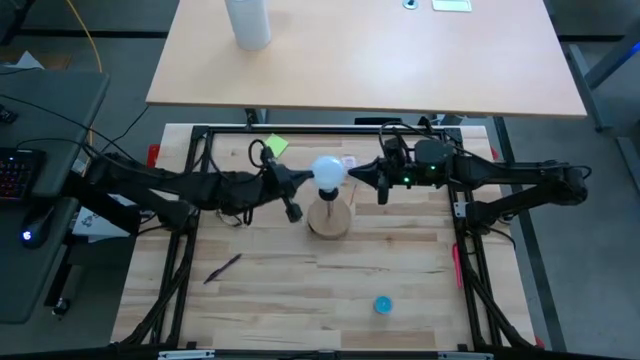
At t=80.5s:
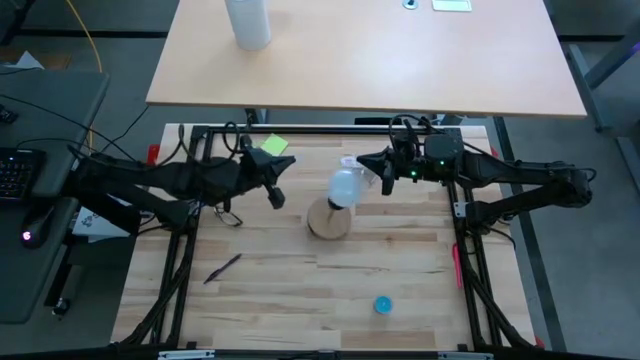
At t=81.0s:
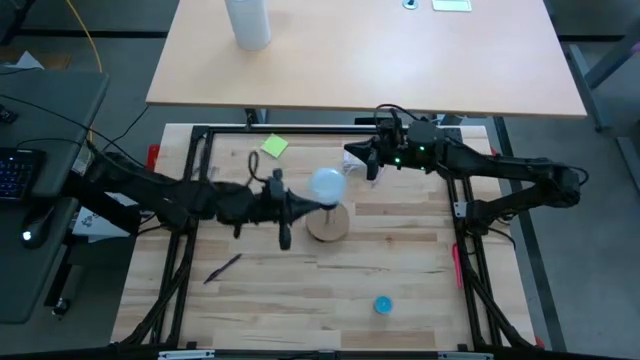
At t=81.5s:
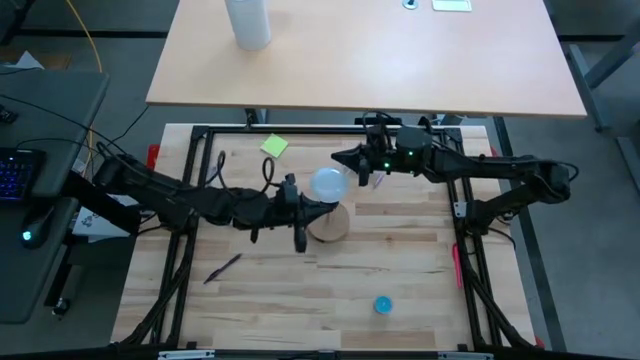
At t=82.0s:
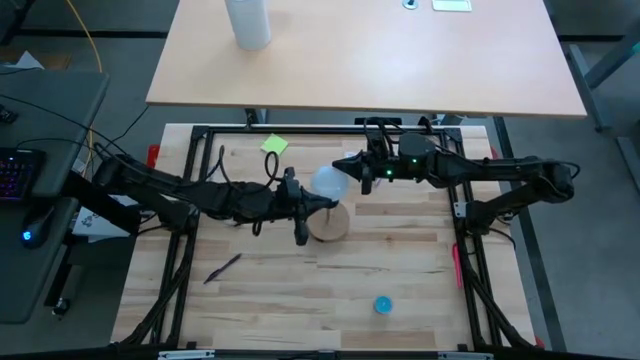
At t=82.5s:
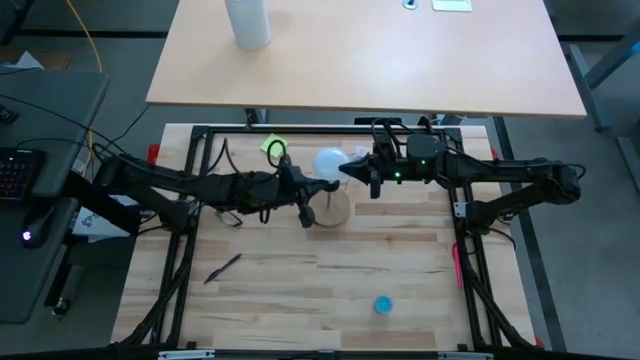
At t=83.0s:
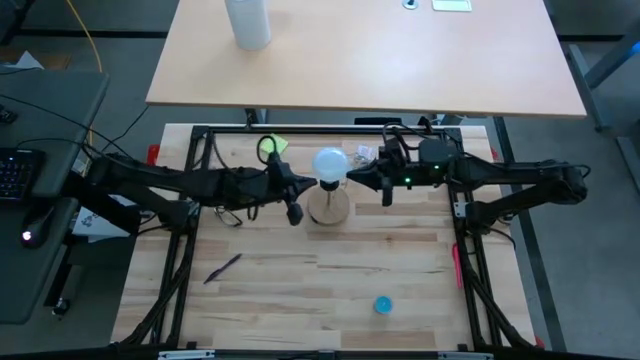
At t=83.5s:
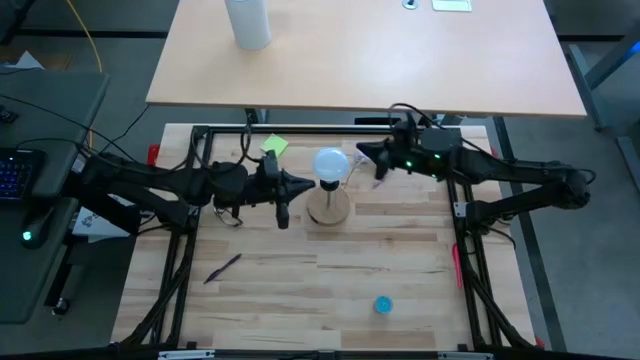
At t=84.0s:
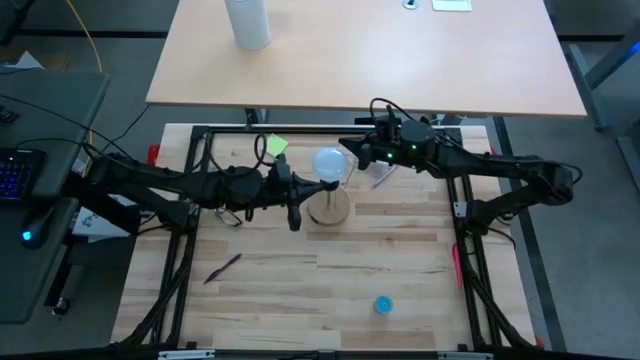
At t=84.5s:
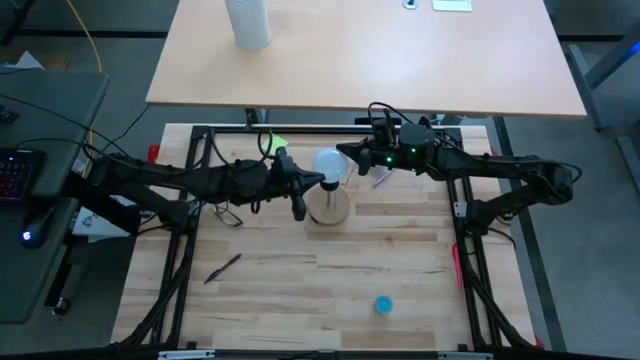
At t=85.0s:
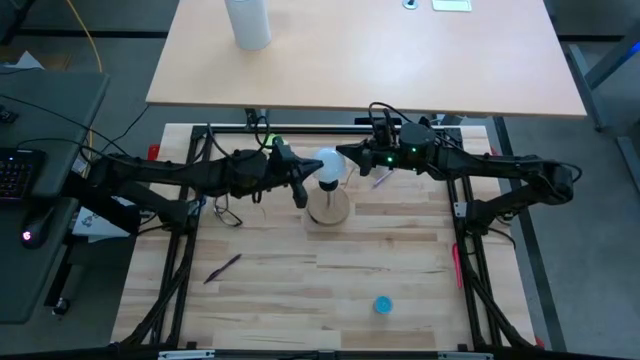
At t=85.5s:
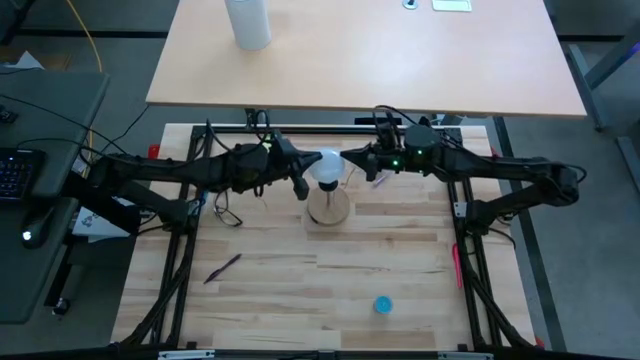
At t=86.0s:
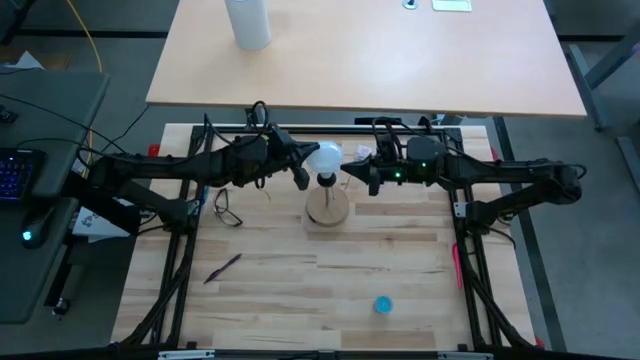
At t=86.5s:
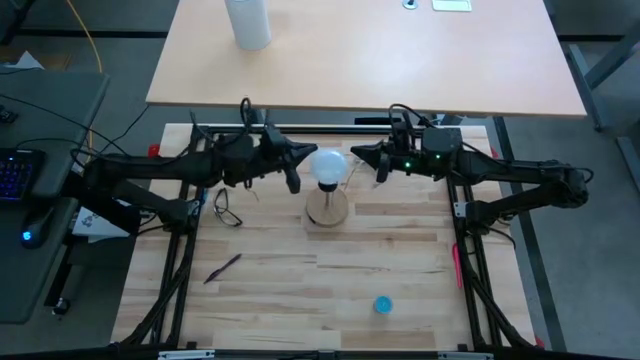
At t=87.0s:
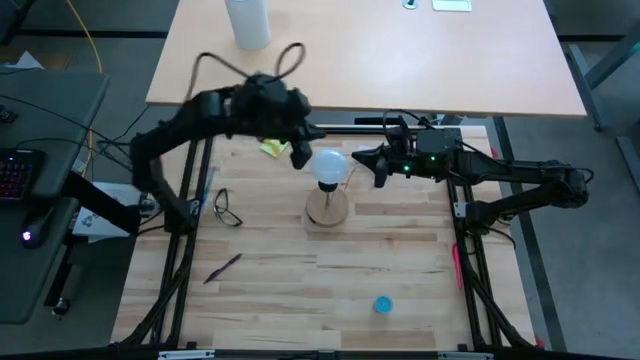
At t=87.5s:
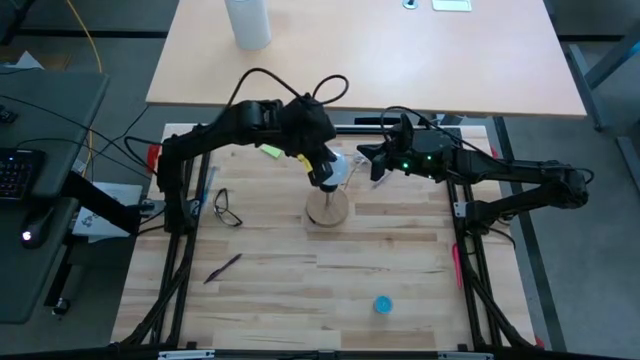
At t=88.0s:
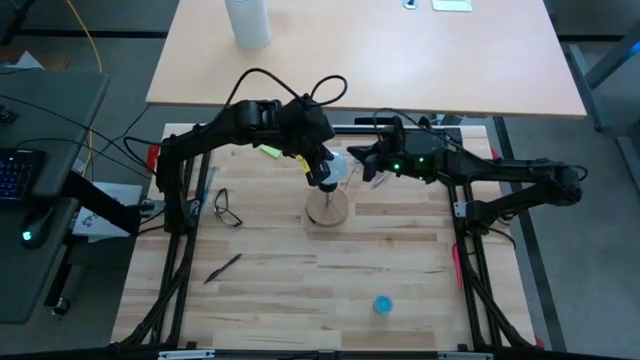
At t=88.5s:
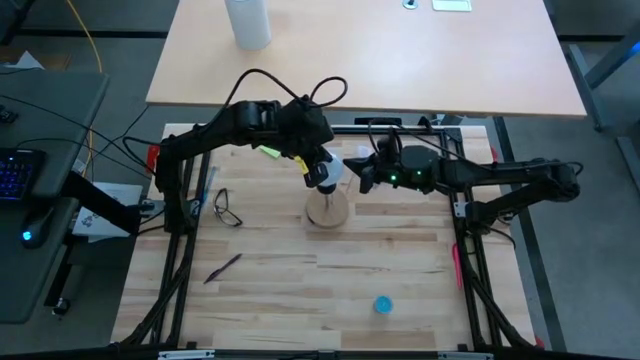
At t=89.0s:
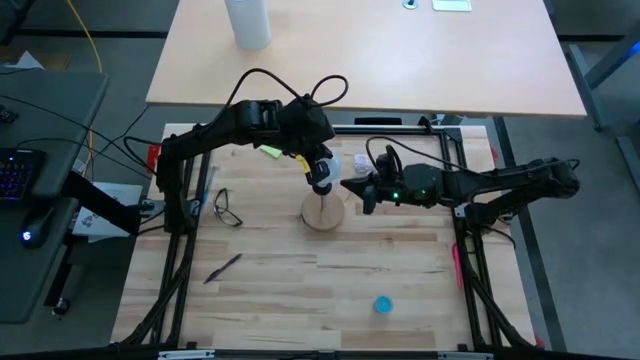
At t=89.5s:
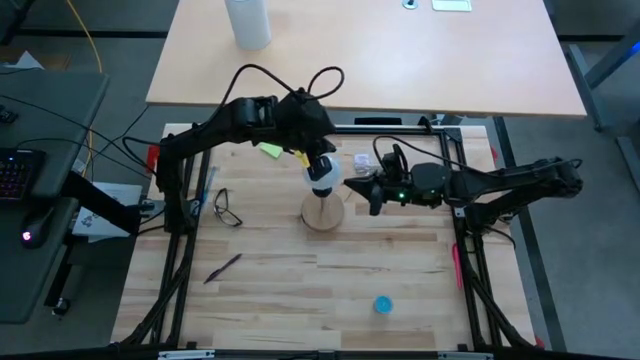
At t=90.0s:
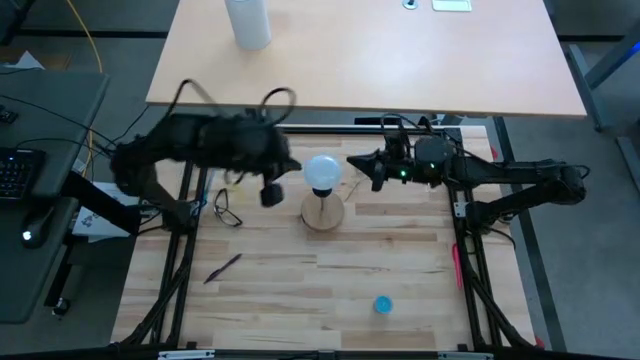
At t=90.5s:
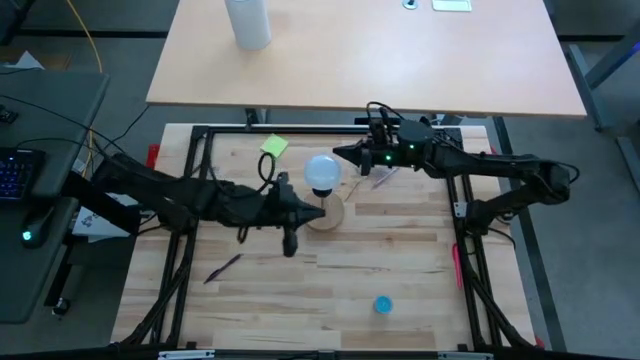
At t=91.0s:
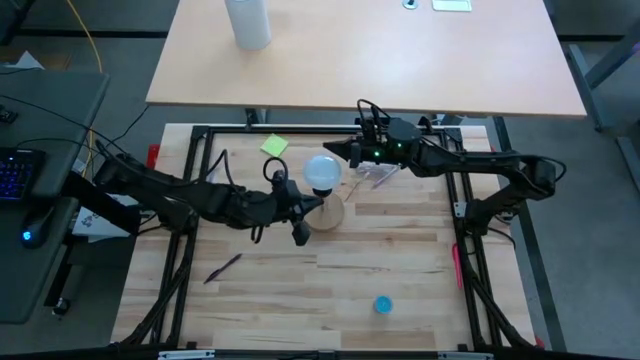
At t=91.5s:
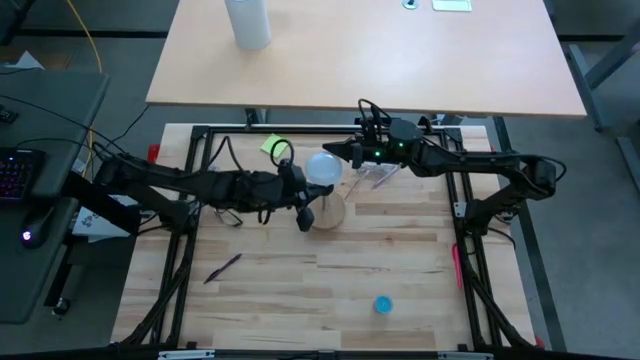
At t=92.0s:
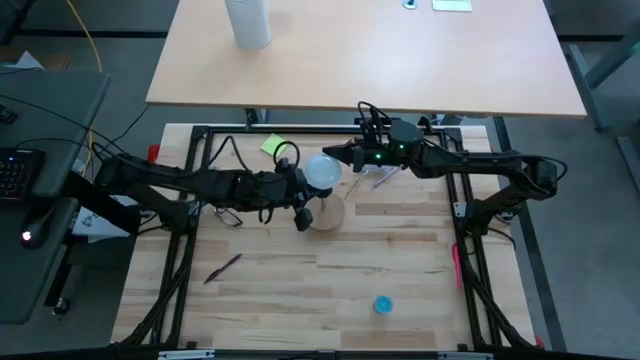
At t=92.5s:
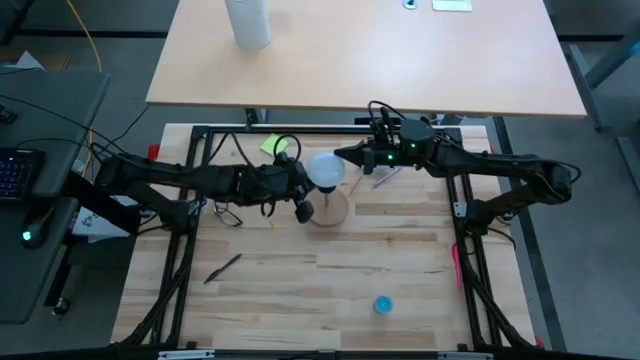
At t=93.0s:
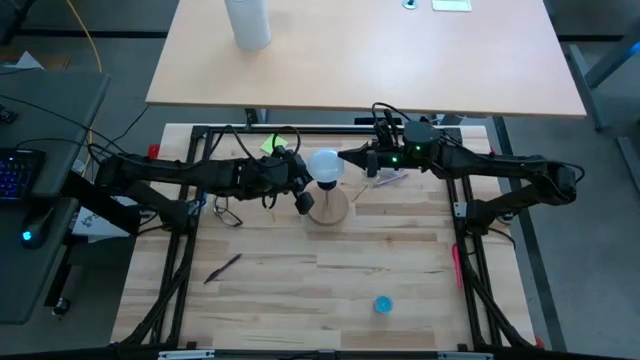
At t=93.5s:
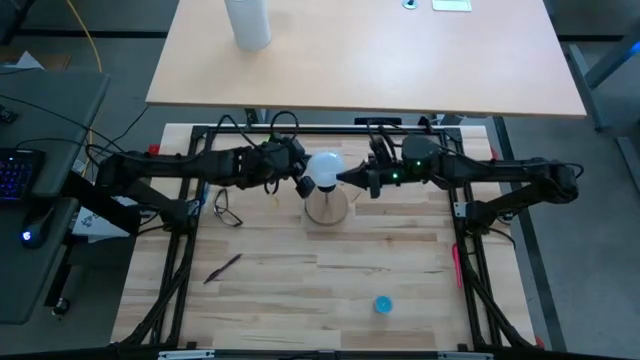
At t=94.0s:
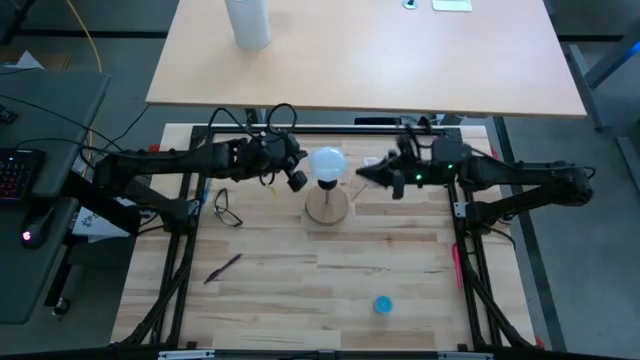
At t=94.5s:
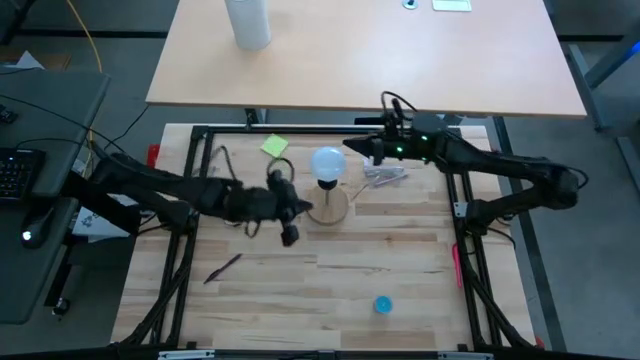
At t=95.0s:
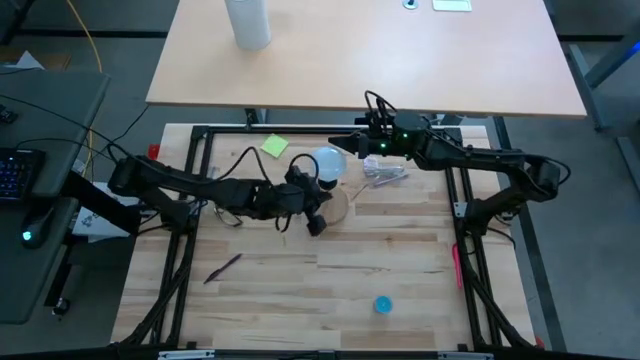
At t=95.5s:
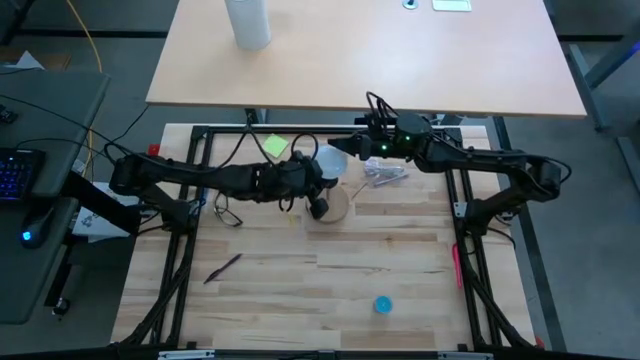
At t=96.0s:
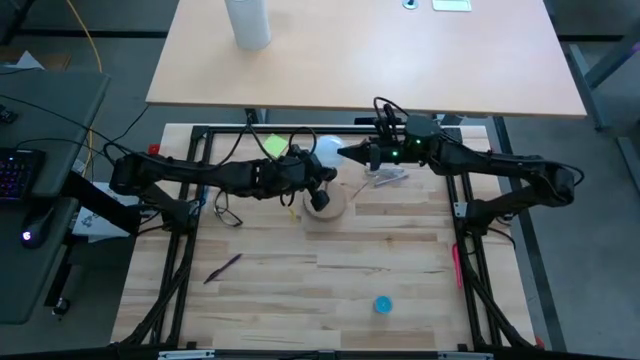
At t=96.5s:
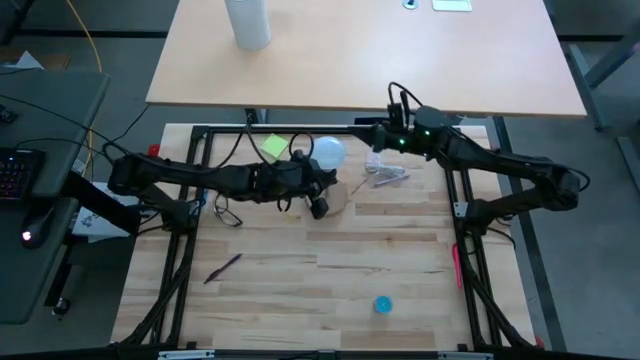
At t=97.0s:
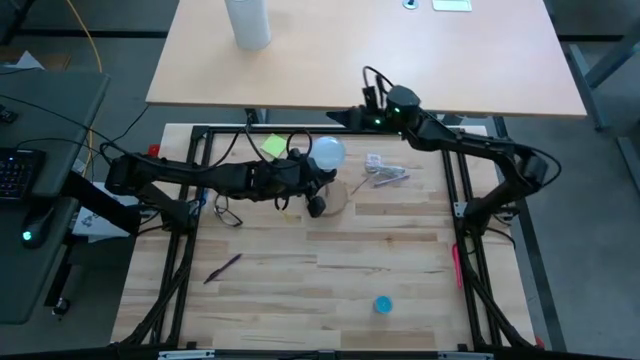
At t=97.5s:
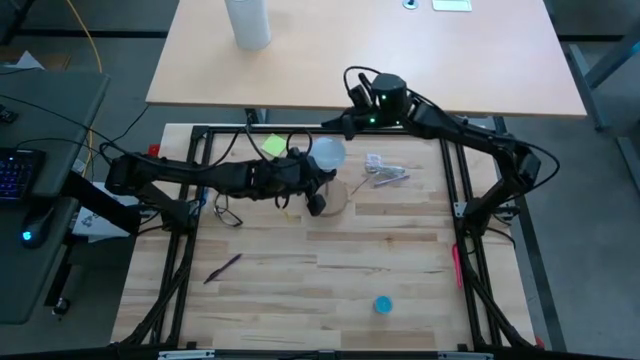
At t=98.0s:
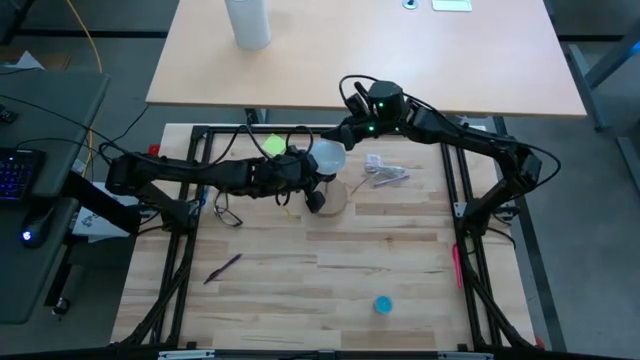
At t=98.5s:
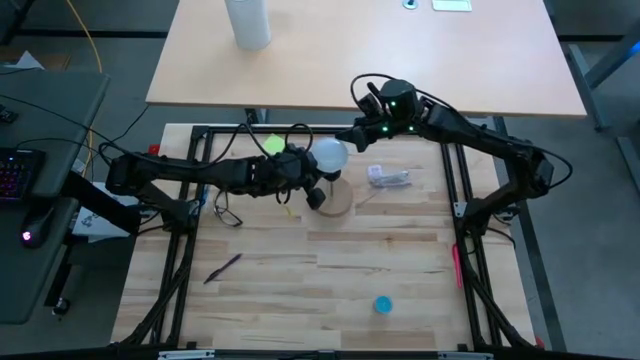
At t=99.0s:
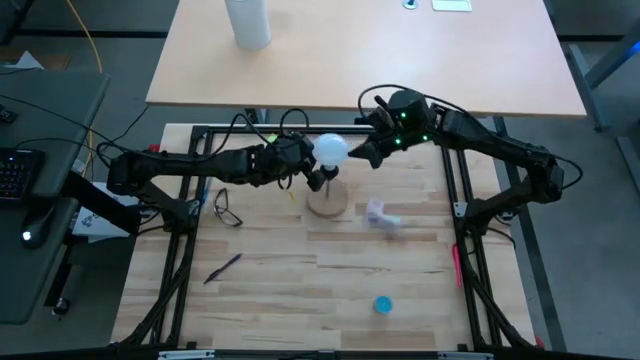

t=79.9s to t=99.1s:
Task: Screw lightbulb
Insert the lightbulb into the lamp
